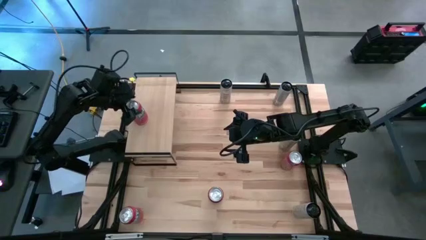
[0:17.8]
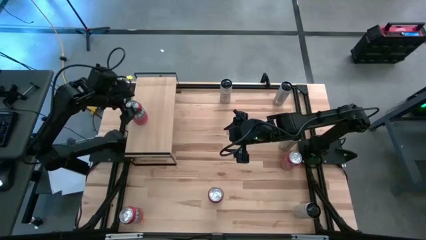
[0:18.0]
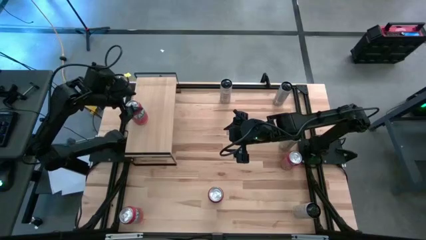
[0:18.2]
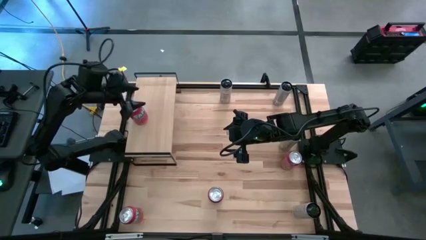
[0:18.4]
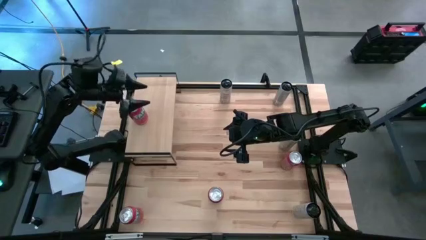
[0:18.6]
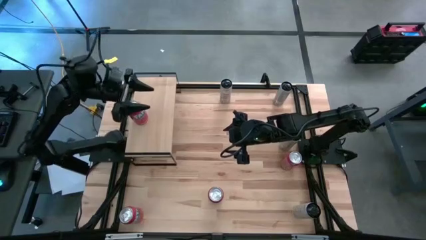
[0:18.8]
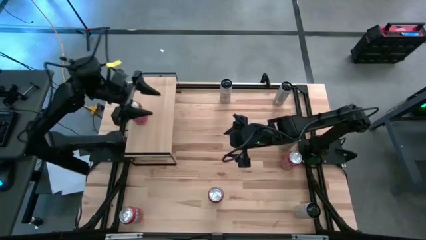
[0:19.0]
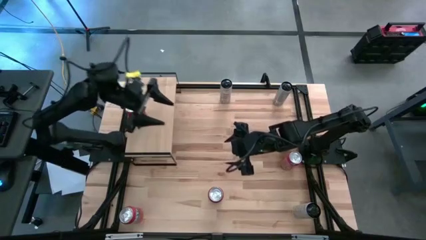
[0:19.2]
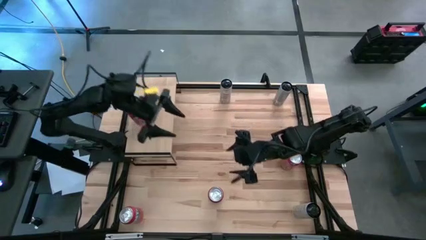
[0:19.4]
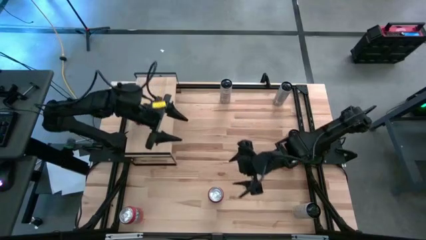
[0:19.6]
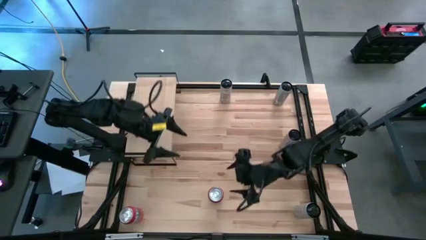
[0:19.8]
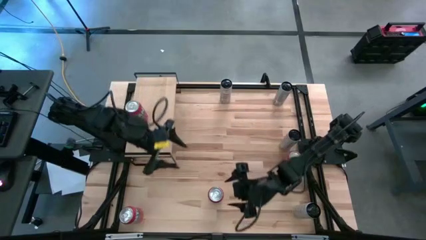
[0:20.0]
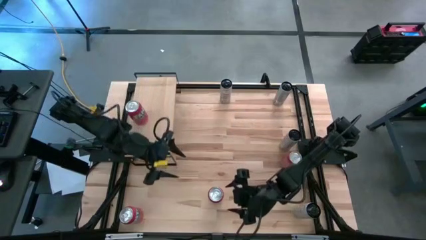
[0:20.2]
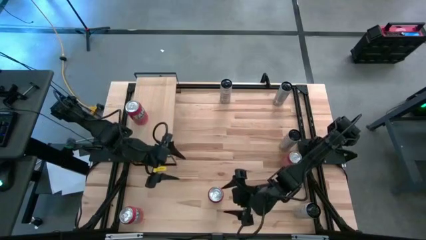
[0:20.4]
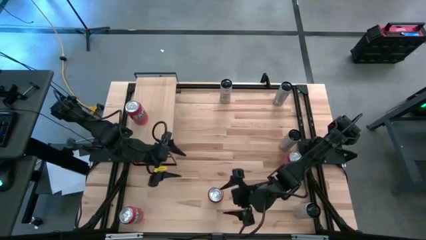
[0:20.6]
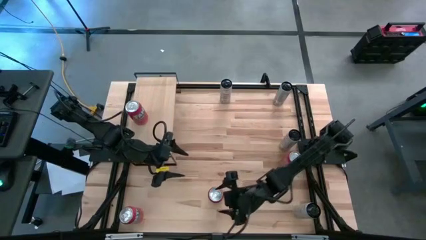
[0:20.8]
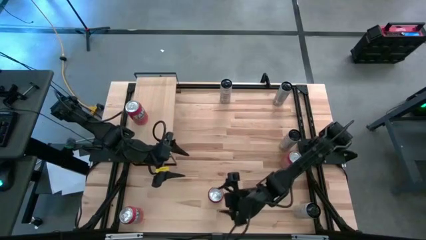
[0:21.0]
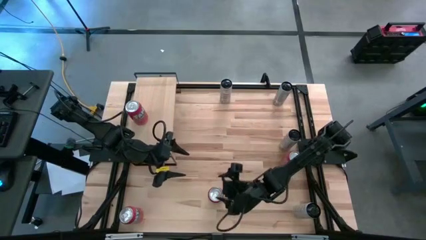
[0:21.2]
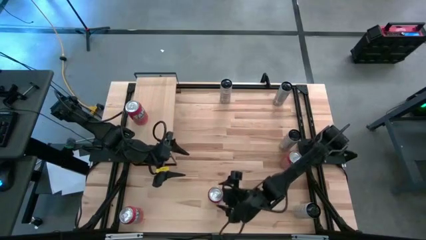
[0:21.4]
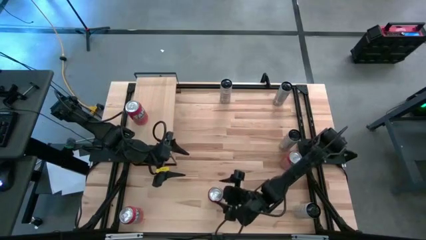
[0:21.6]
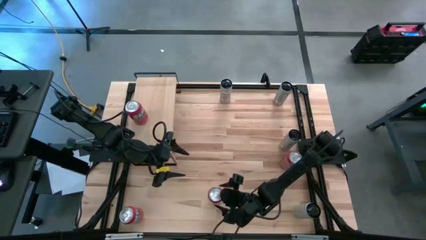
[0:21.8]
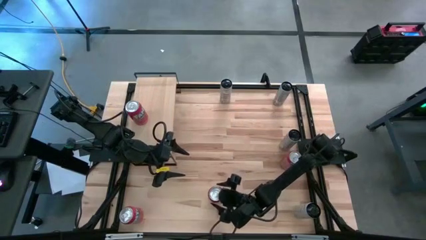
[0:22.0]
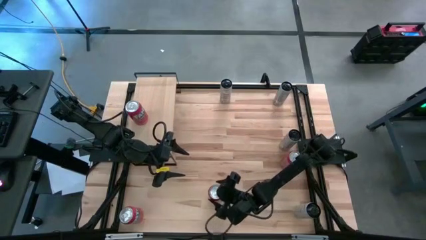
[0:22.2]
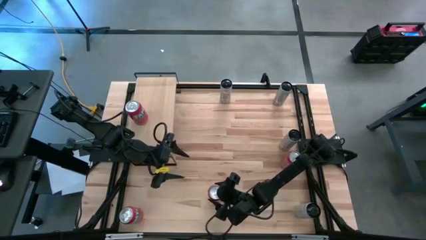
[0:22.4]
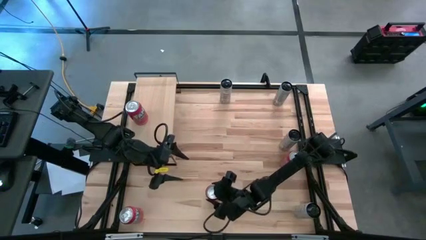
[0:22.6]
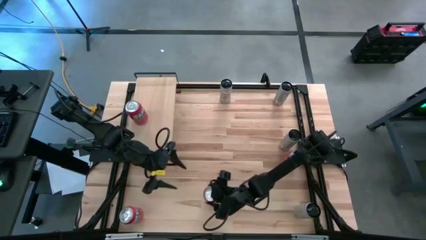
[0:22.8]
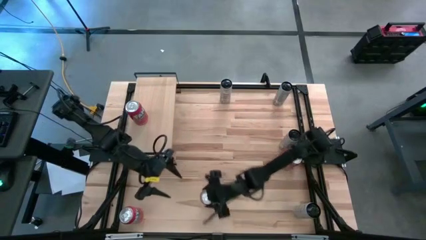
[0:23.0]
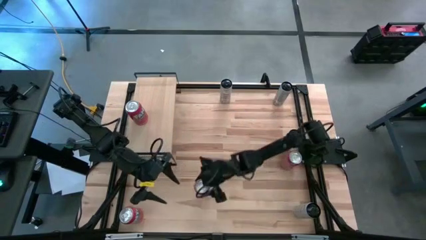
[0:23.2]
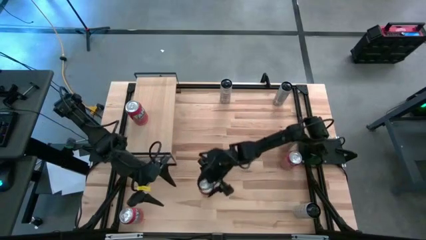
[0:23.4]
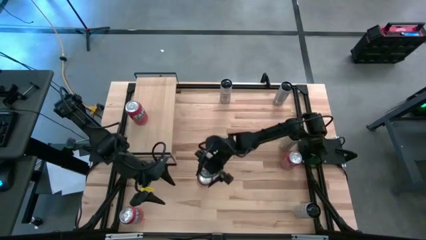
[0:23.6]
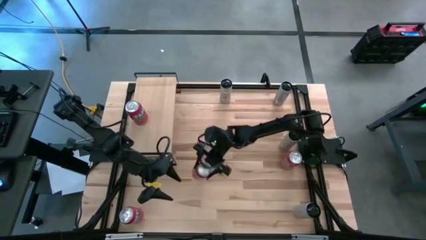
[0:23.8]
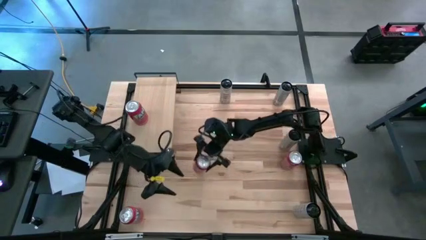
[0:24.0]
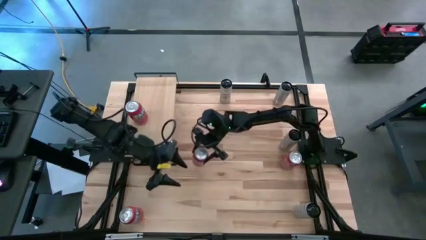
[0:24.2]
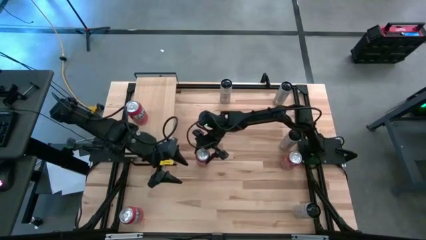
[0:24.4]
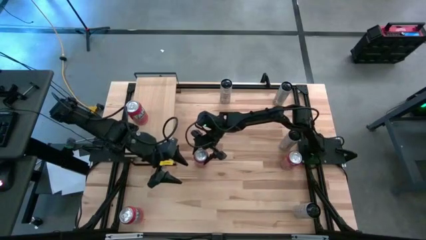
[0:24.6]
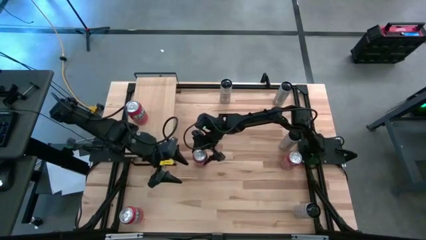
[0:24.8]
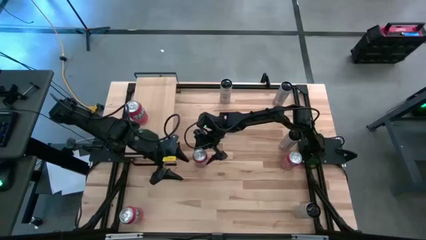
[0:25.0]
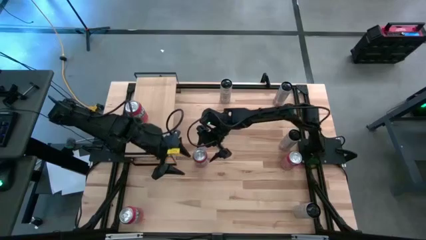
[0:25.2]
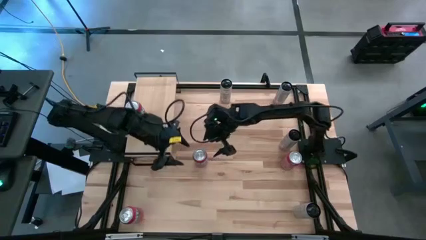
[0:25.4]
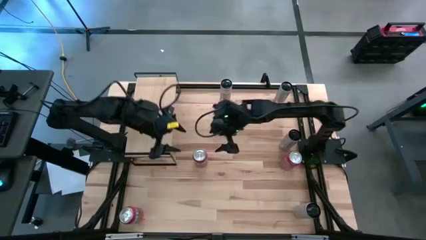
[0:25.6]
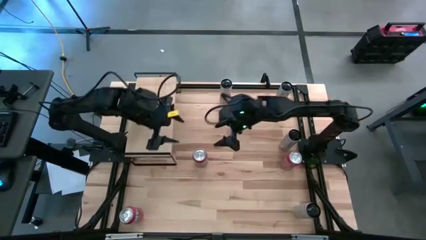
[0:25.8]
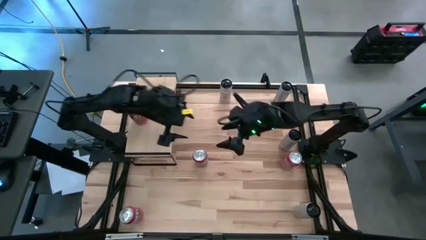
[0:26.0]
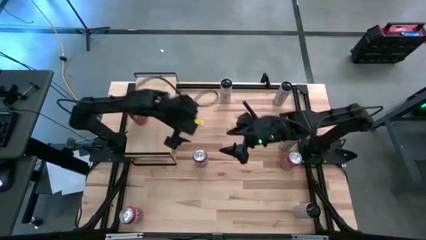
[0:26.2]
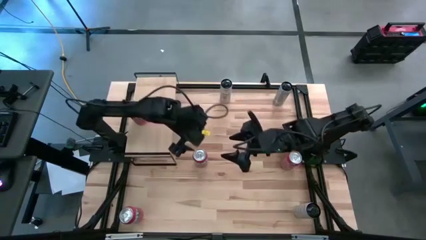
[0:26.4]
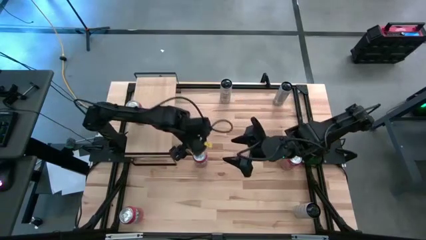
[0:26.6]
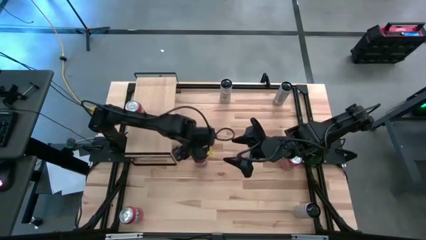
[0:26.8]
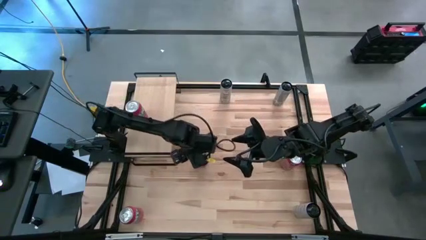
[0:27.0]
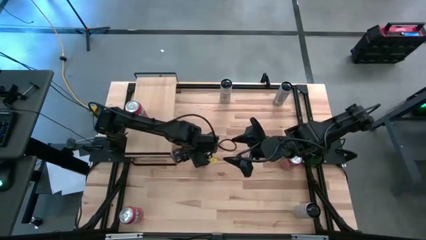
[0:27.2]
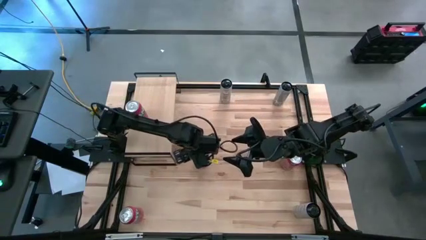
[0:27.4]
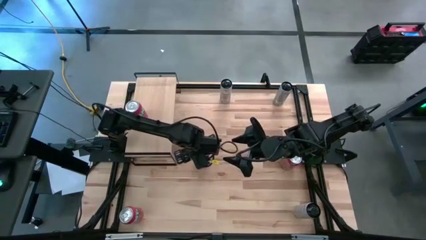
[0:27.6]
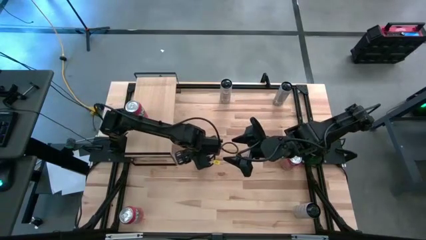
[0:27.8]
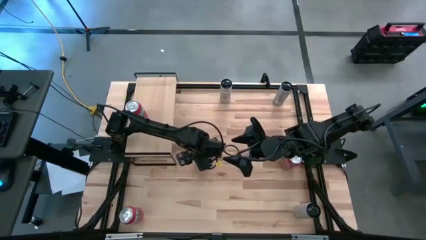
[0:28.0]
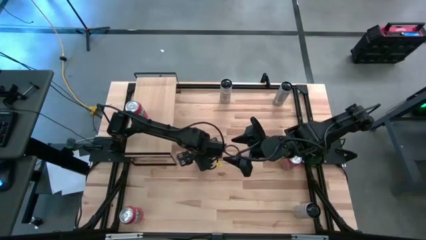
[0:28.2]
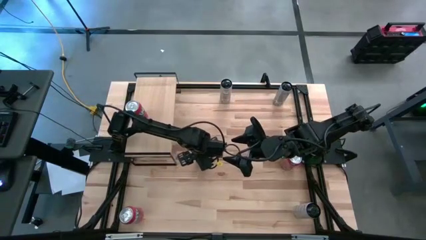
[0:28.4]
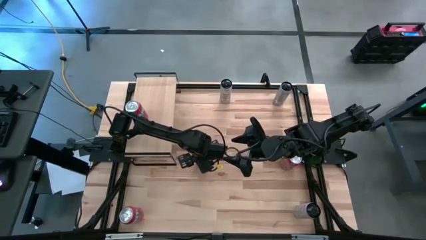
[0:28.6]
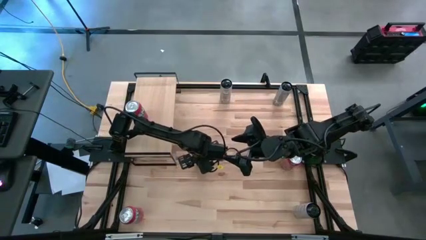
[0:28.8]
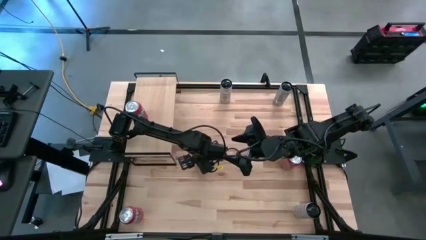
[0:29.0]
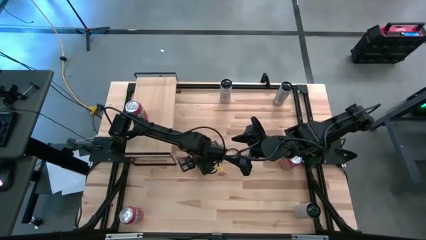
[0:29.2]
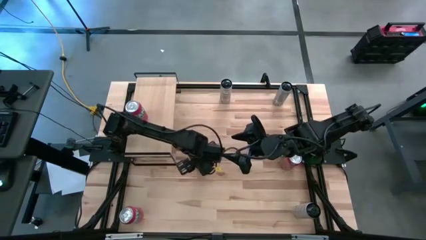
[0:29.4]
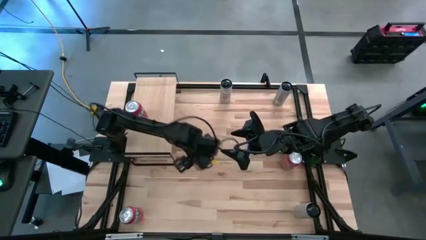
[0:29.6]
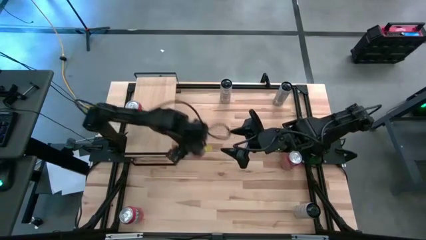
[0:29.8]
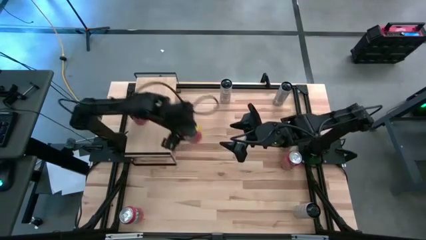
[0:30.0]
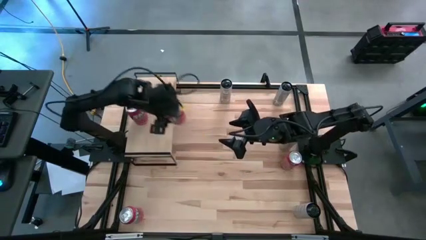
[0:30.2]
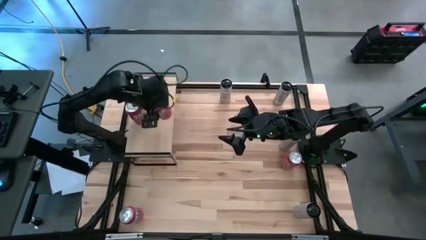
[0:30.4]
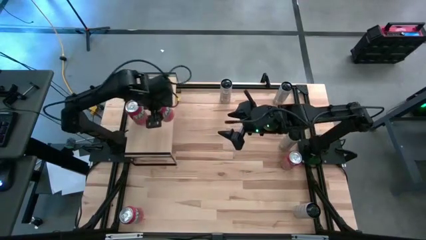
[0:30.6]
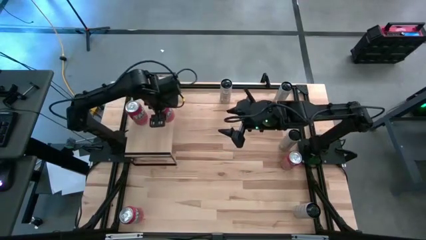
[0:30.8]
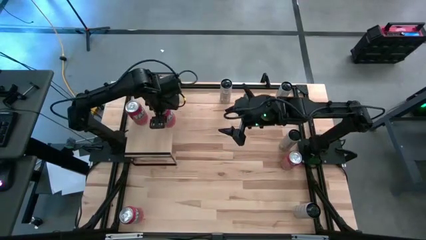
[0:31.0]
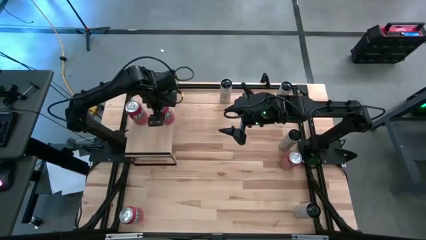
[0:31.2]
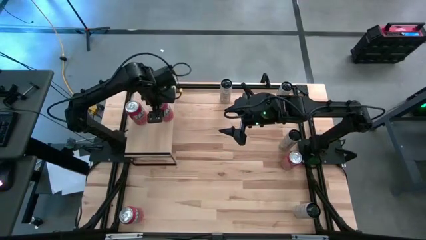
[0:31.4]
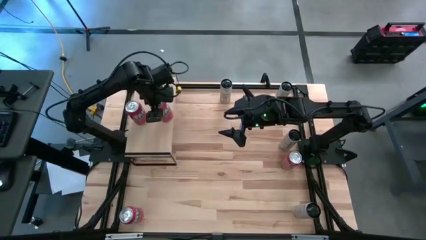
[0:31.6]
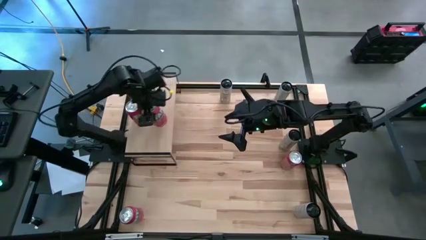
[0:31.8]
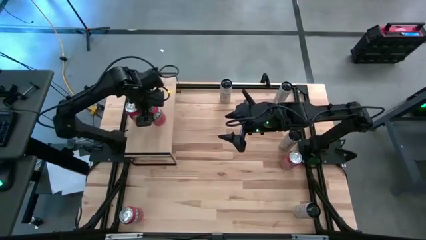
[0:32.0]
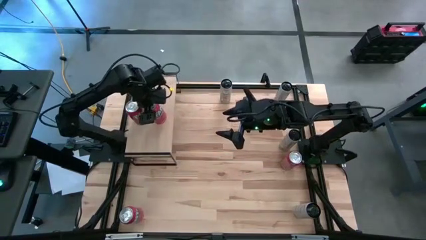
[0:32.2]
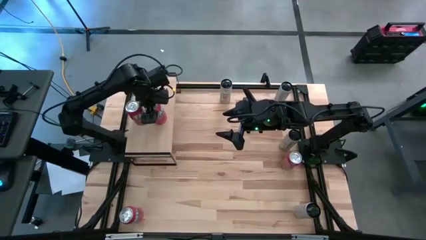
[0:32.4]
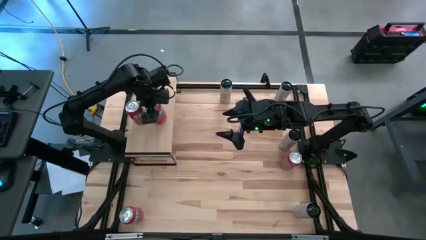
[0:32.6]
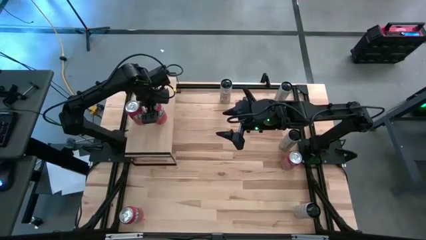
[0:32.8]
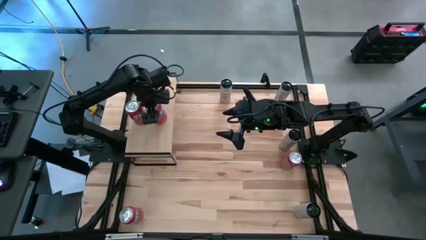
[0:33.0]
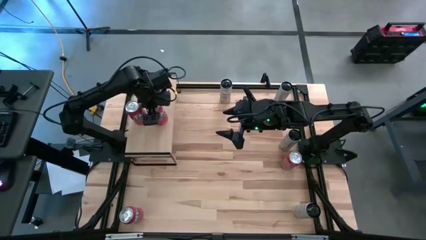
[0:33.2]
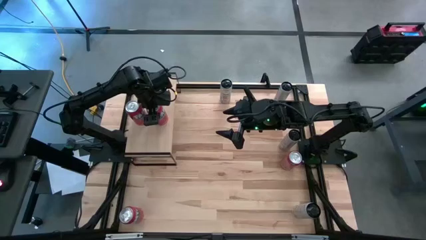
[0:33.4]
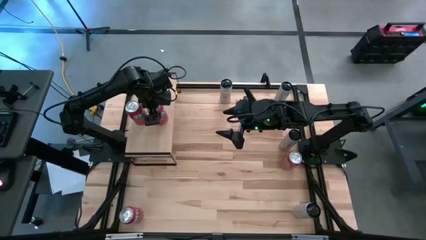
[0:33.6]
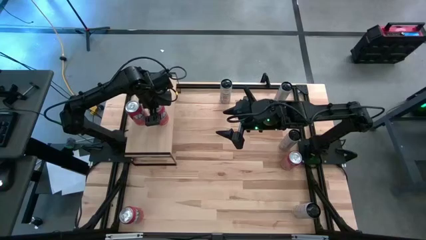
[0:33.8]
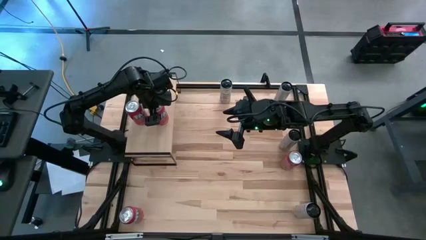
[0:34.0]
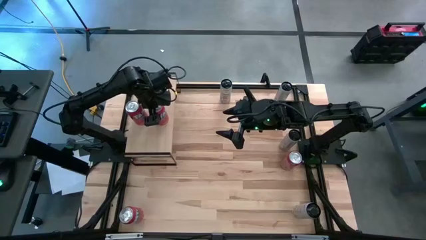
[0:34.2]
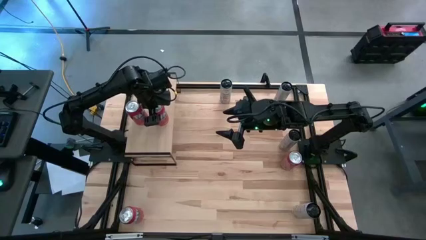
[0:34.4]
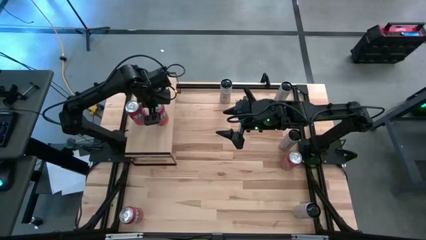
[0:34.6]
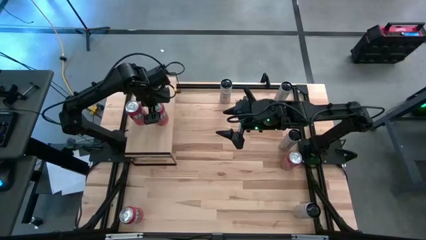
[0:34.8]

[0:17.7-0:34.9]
Task: Place canned beverage on shelf
Put the middle red soda can on the shelf aligned with the other red soda can
